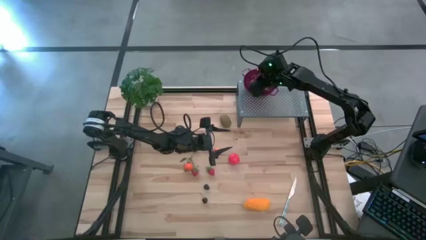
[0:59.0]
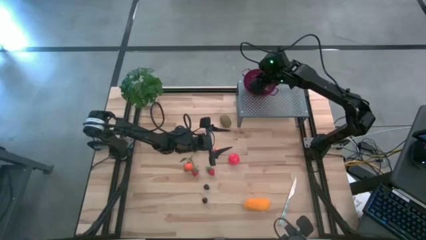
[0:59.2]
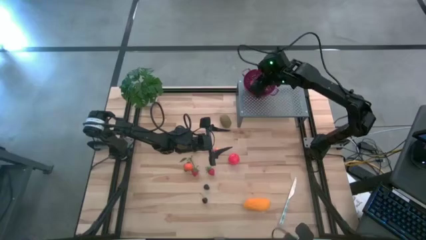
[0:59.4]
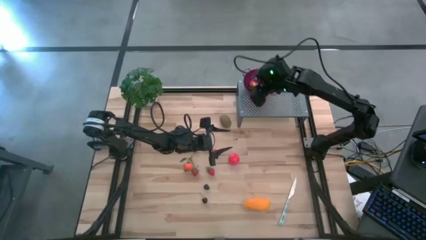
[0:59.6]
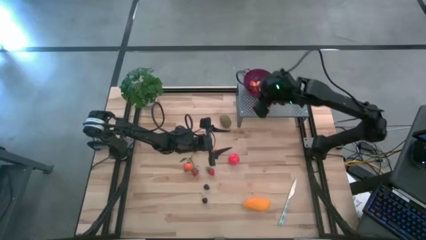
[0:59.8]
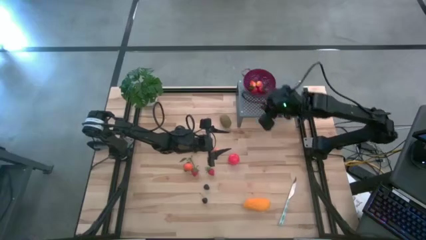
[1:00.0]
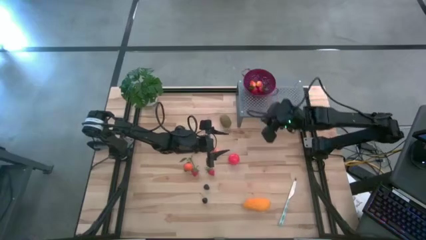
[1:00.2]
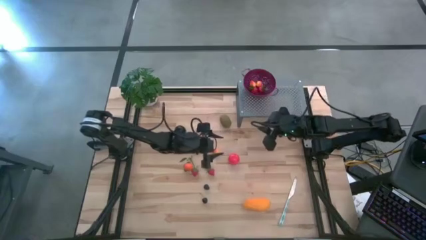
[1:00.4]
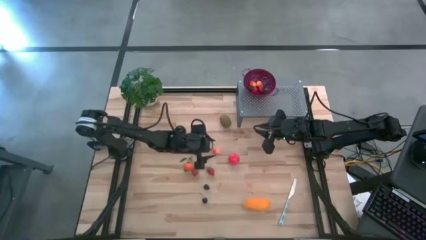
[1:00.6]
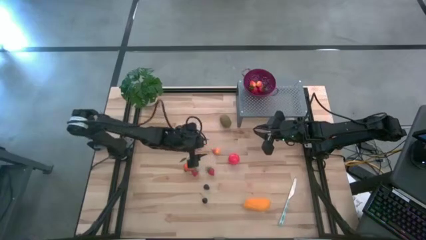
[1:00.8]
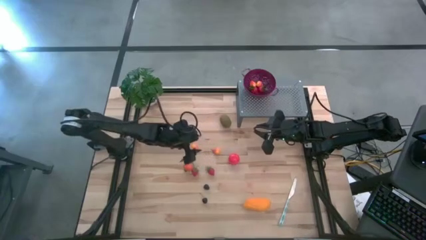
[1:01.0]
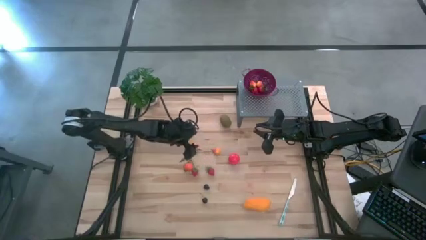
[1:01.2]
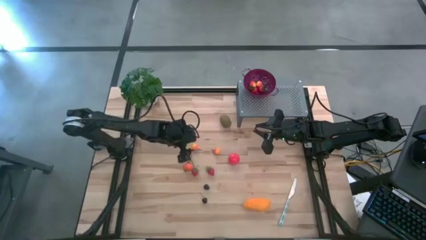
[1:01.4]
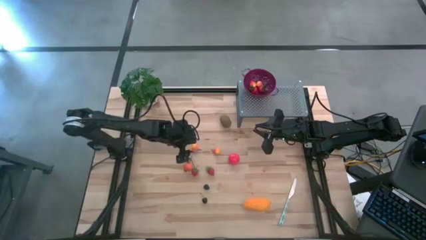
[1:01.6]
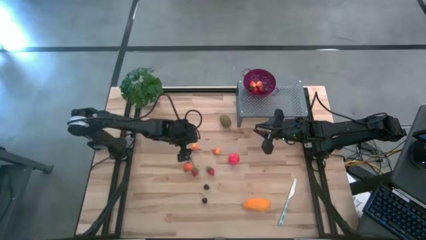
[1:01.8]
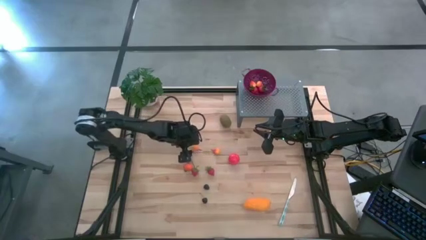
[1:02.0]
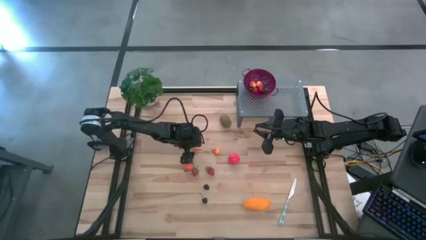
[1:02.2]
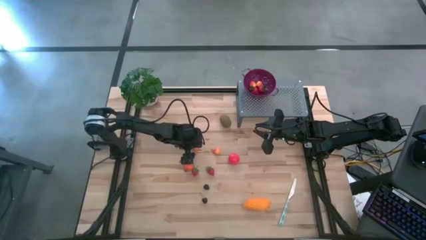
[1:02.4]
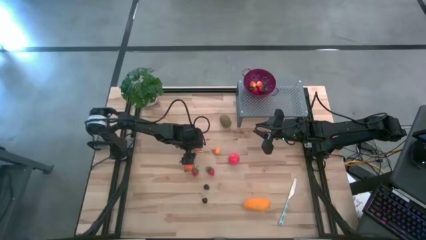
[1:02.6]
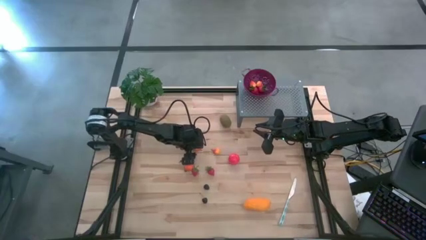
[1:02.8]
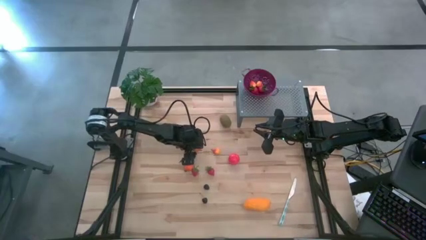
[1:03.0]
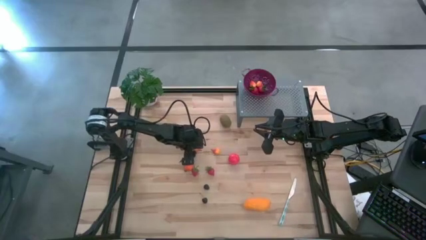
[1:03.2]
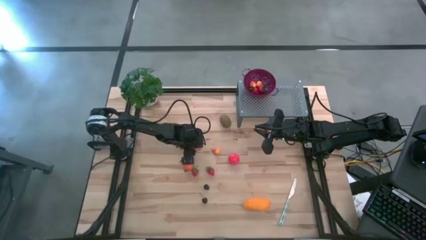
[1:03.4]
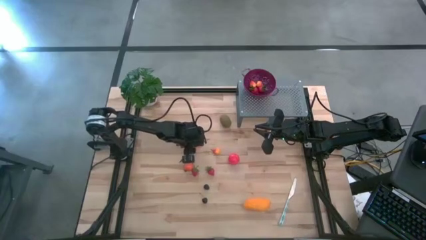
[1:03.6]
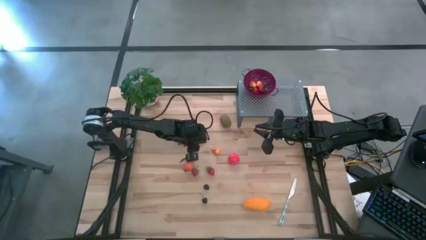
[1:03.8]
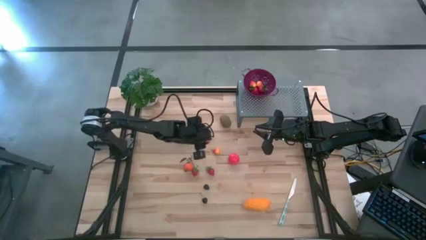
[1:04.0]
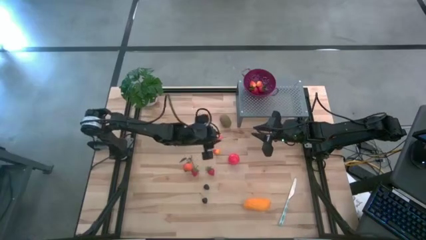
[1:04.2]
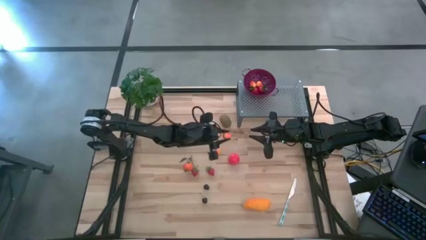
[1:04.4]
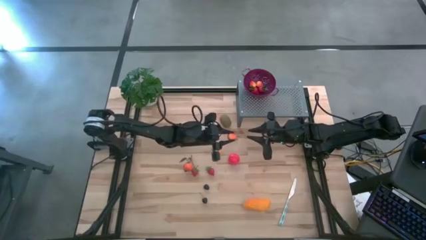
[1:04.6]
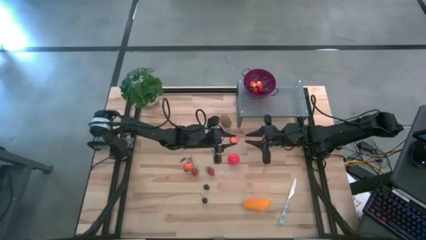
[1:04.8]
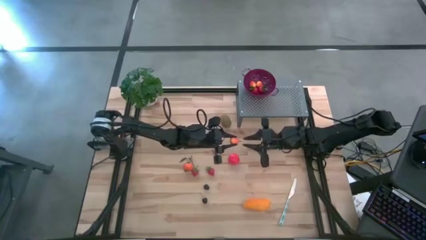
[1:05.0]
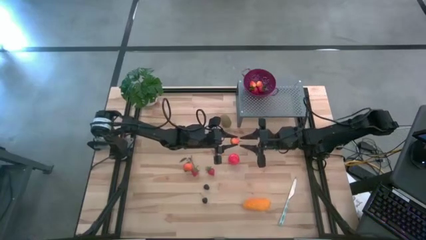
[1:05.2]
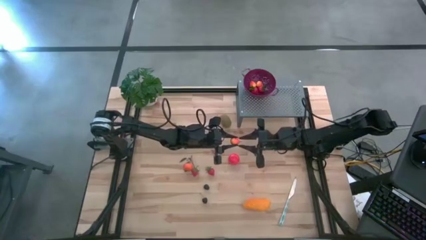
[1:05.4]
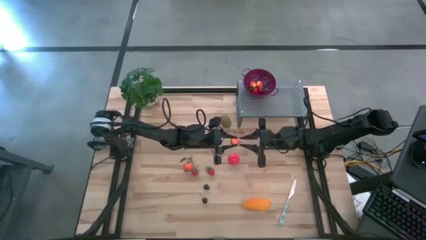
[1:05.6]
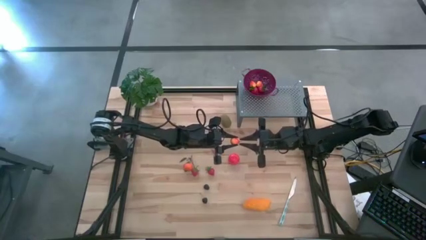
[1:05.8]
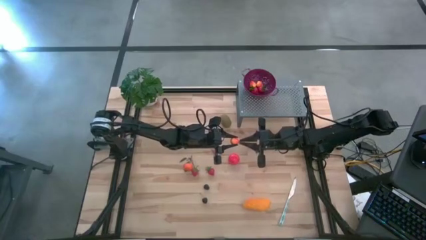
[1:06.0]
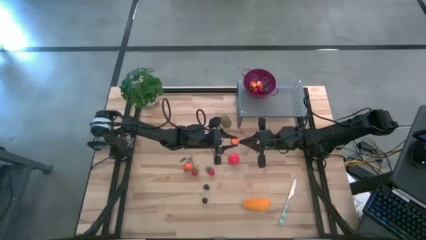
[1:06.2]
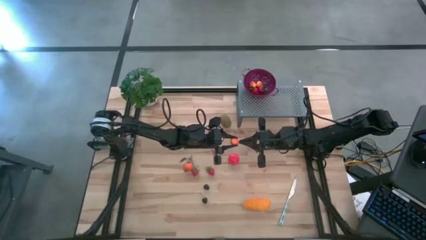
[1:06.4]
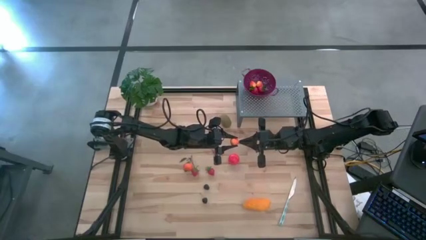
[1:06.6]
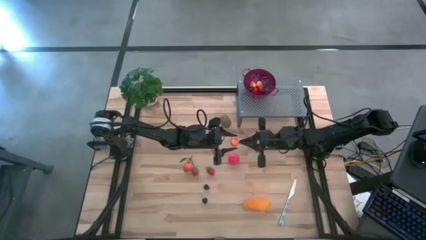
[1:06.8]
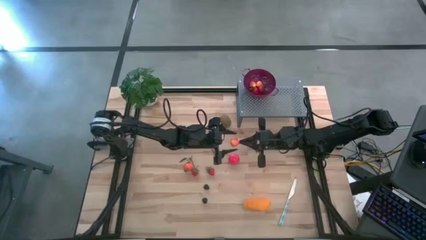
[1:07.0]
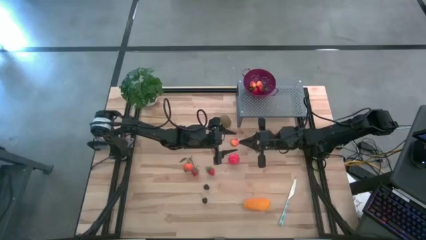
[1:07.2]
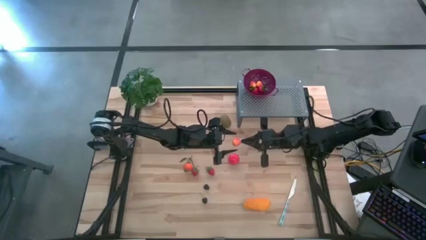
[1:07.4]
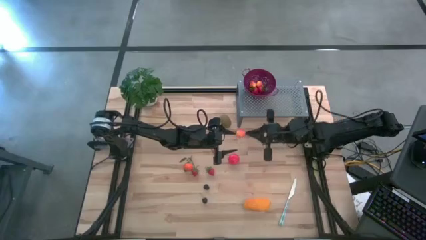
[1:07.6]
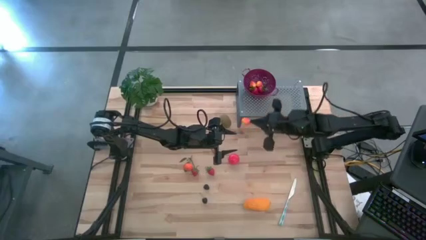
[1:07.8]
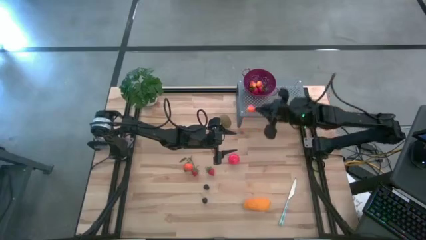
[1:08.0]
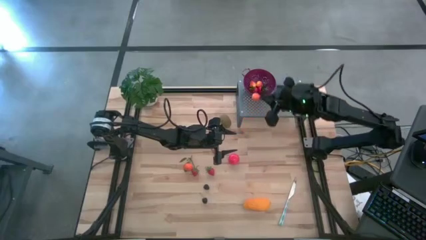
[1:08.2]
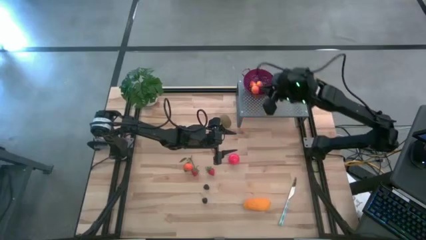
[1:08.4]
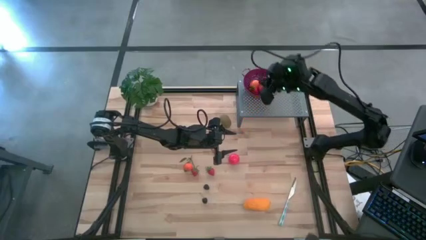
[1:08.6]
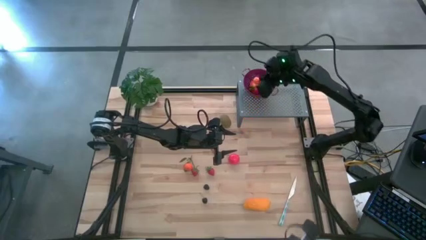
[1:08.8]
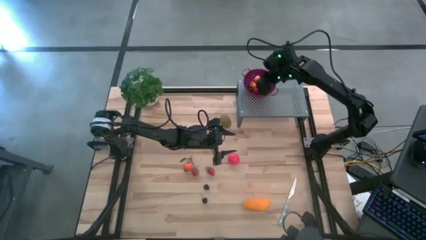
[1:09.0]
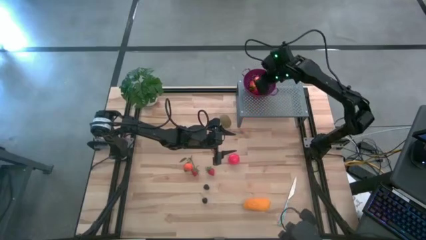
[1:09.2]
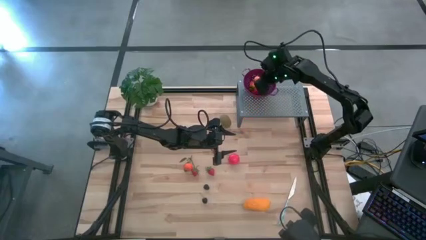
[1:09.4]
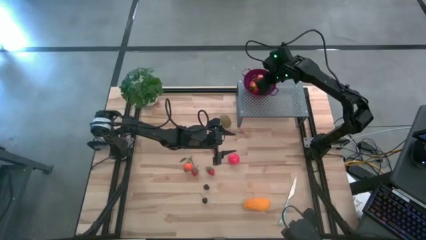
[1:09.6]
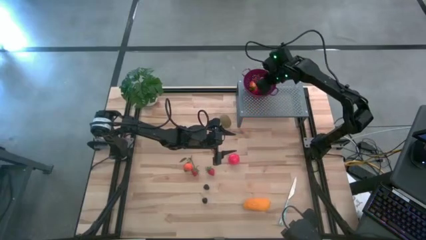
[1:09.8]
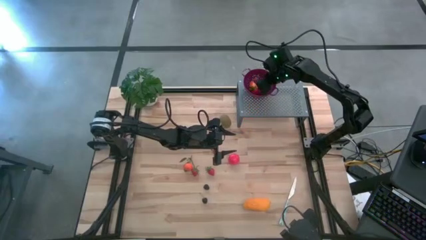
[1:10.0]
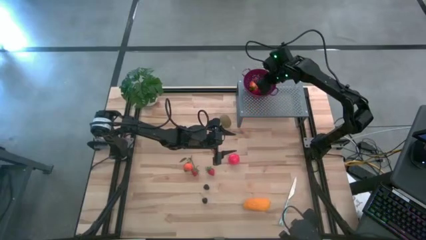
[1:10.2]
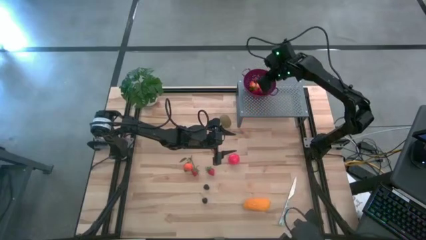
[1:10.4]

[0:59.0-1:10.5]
Task: Pick & Place Fruit
Put the peach into the violet strainer bowl on the shelf

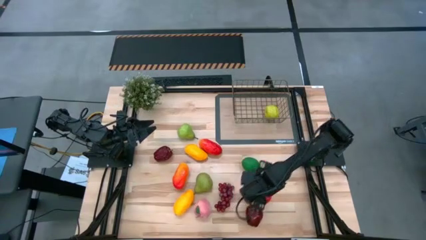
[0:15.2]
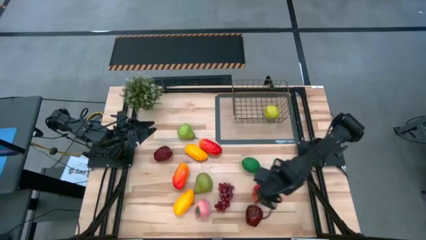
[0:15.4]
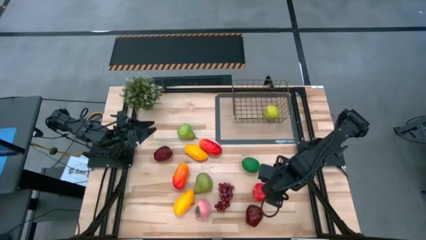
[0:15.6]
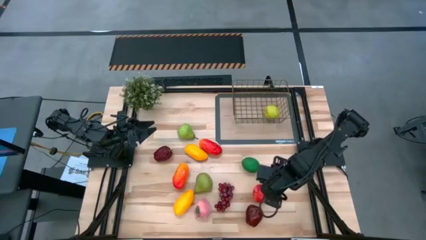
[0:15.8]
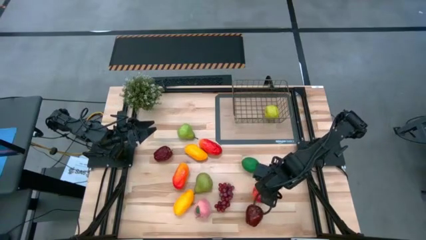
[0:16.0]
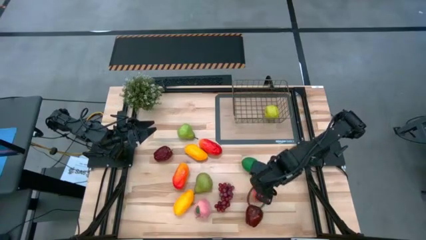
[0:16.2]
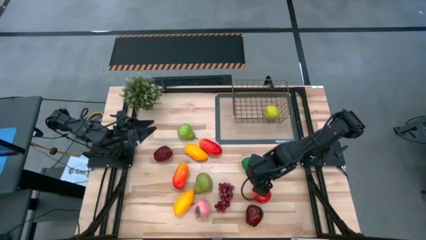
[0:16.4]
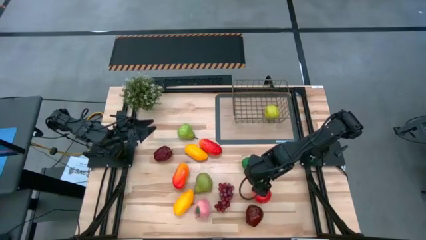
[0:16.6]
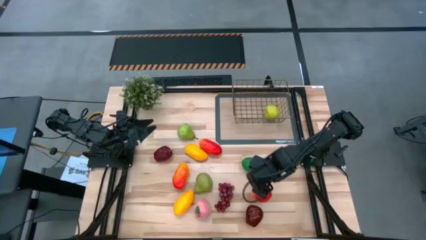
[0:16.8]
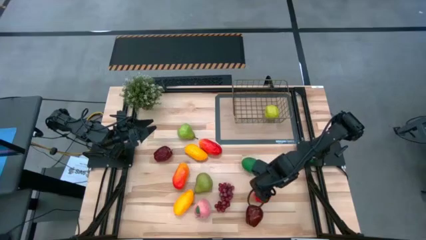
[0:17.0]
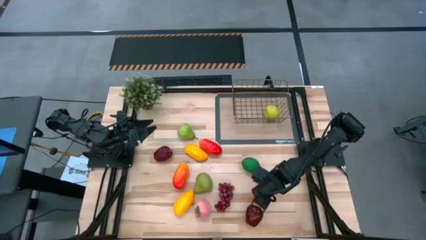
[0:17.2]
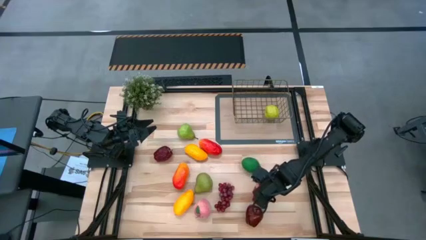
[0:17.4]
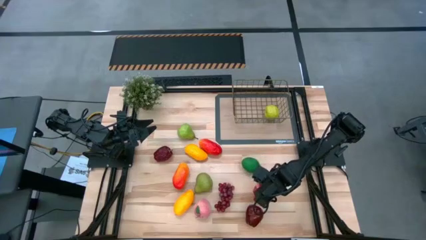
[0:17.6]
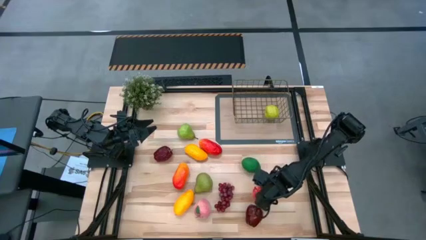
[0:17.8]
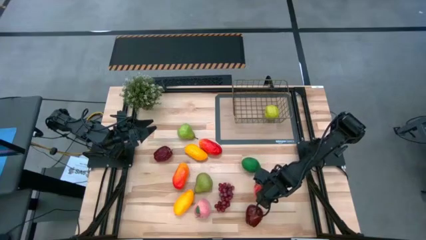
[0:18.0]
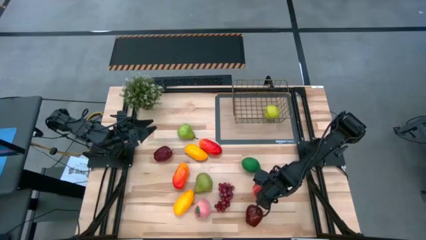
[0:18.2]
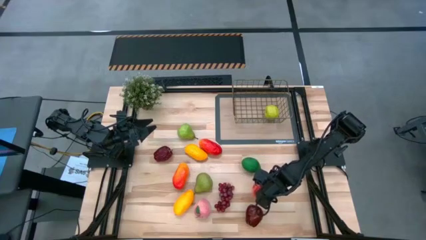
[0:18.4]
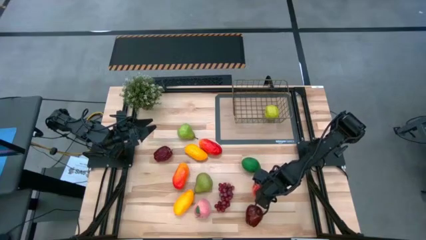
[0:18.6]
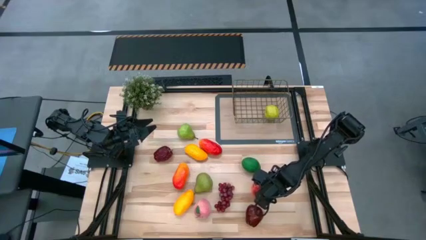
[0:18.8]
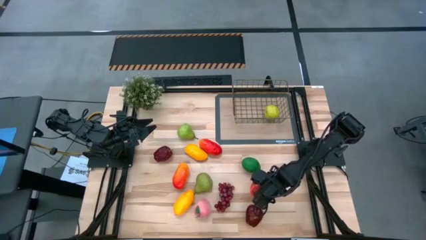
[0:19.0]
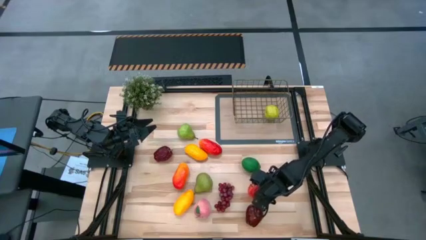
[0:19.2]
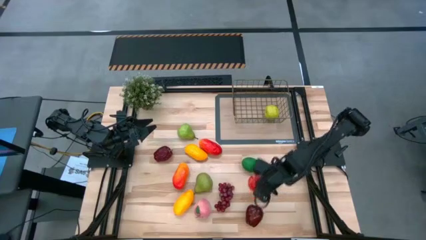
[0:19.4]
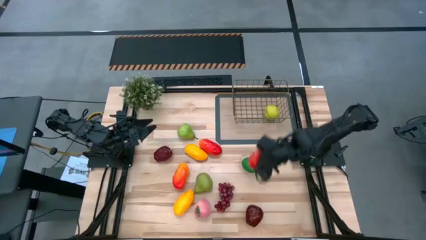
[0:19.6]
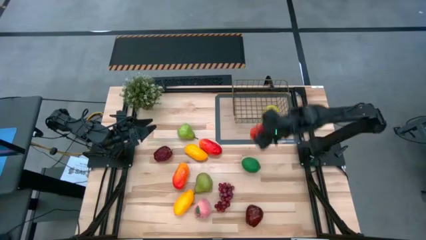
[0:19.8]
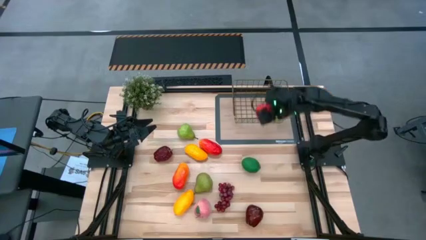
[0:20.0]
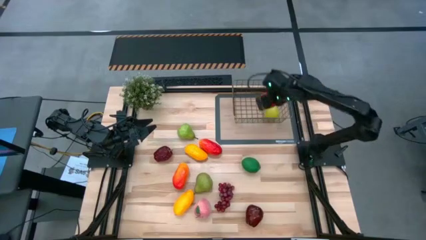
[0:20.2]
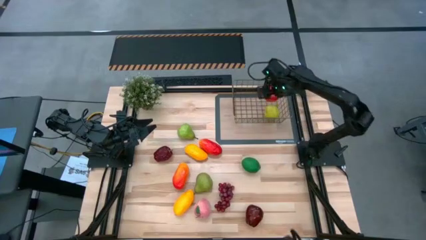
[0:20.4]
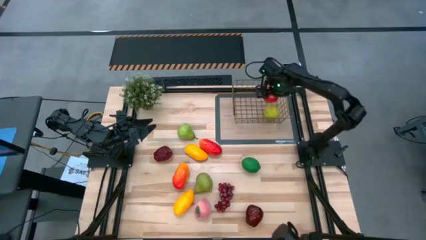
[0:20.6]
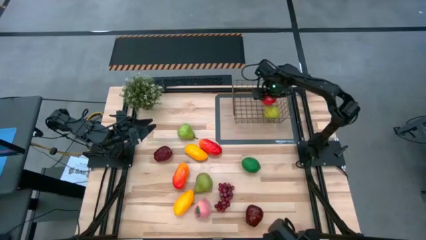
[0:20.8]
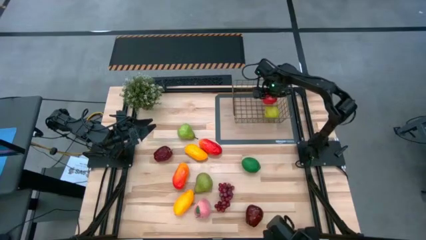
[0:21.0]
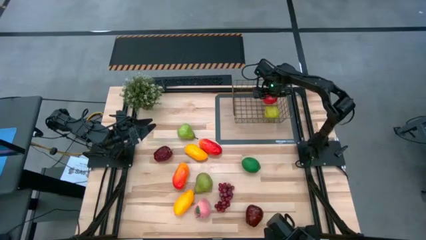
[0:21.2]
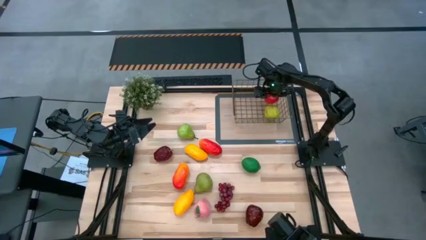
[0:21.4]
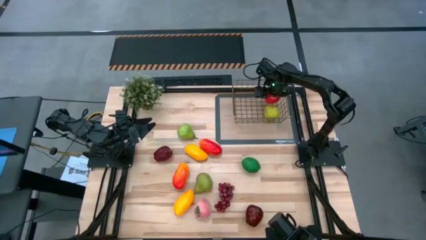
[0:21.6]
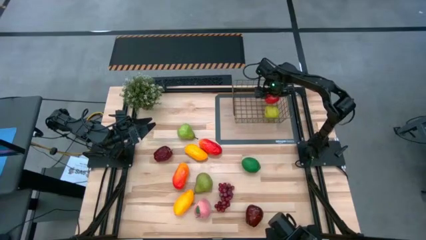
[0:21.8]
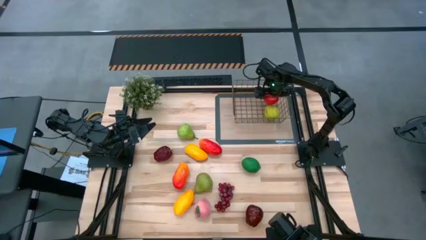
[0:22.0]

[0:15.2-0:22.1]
Task: Build produce basket
Put the red apple into the gold wire basket
